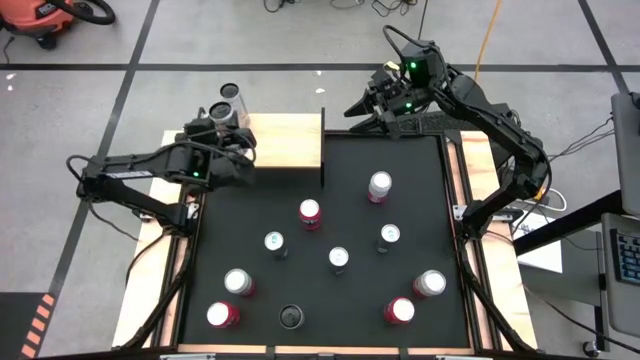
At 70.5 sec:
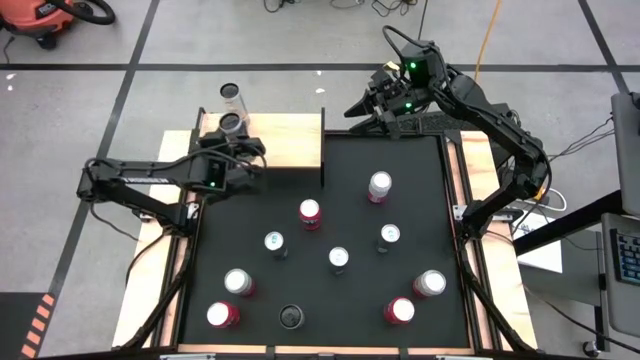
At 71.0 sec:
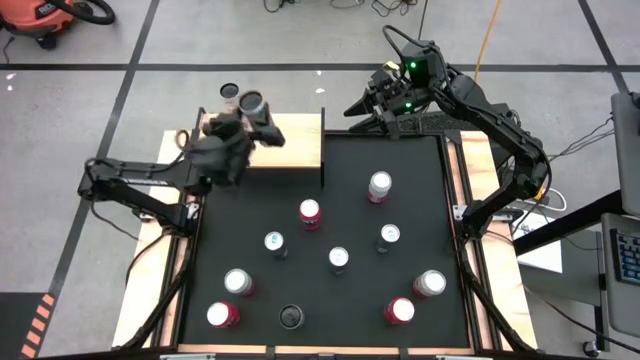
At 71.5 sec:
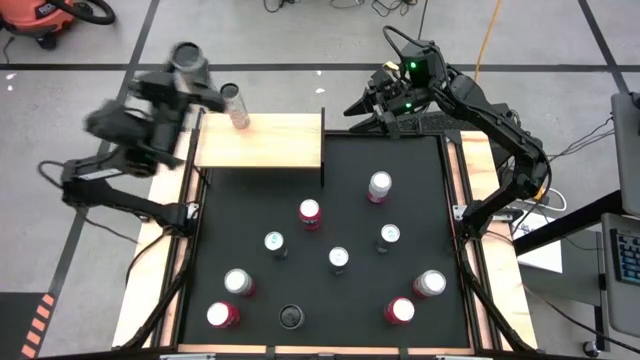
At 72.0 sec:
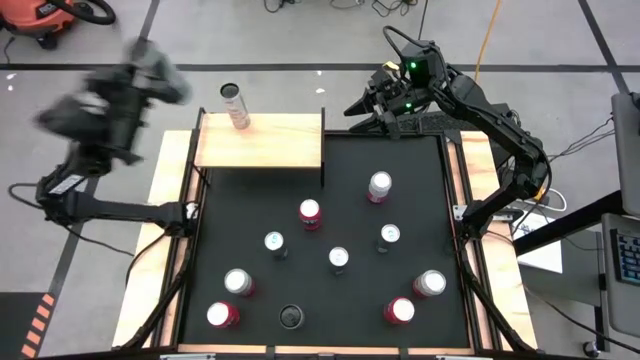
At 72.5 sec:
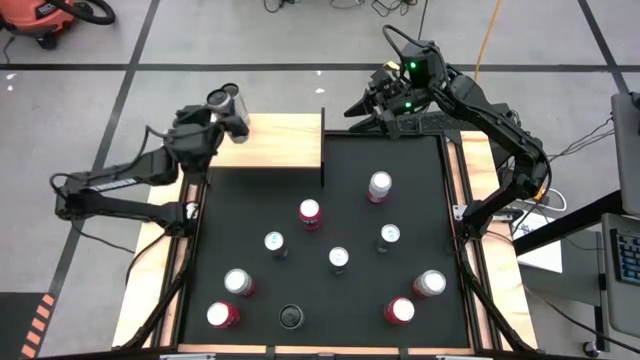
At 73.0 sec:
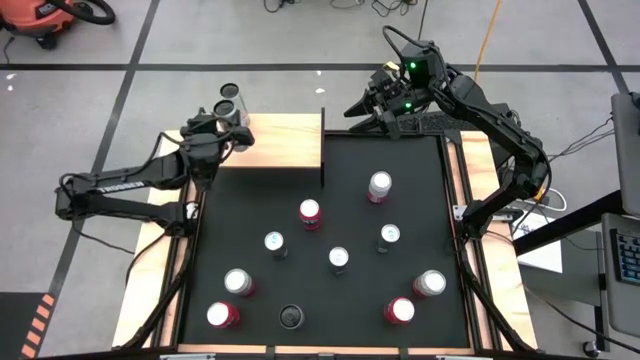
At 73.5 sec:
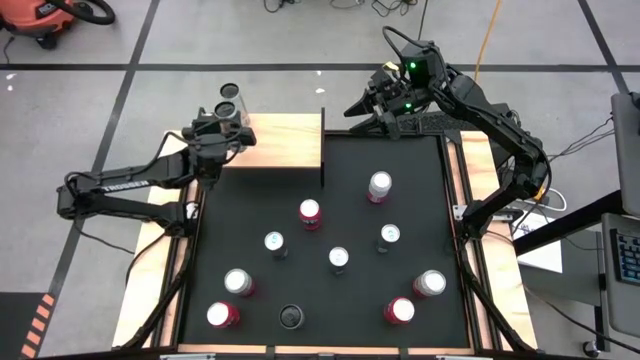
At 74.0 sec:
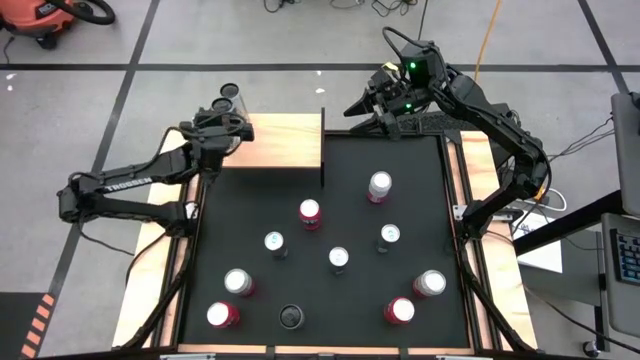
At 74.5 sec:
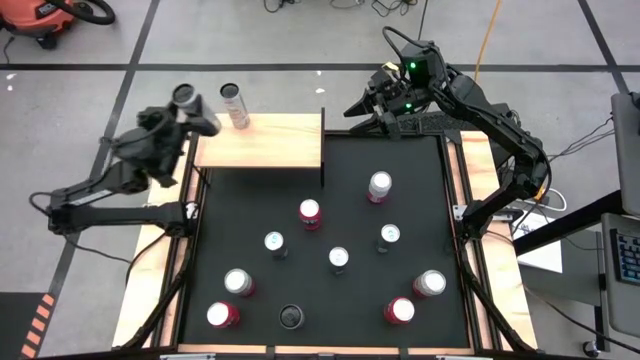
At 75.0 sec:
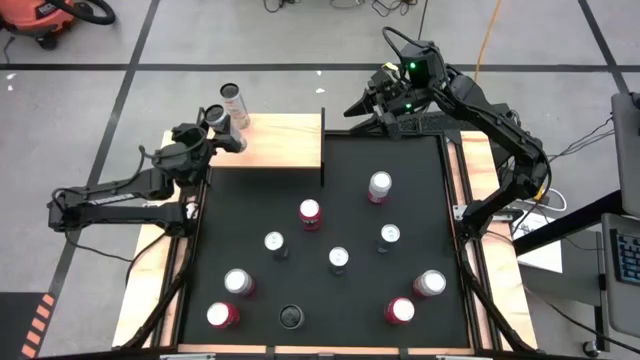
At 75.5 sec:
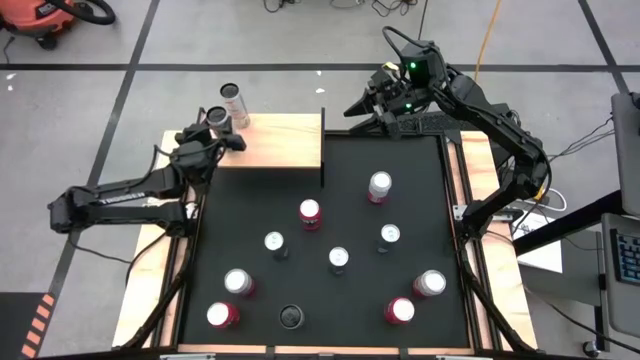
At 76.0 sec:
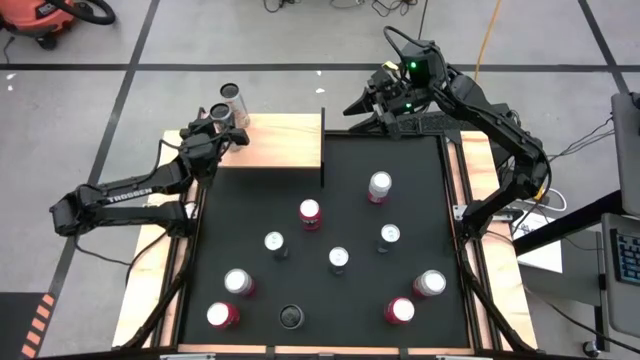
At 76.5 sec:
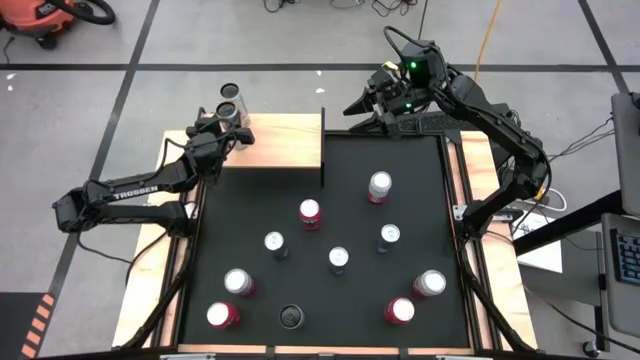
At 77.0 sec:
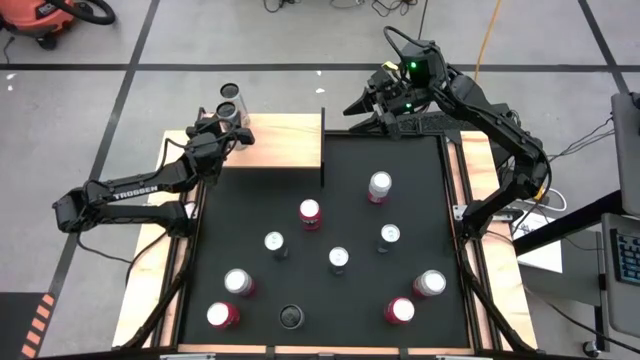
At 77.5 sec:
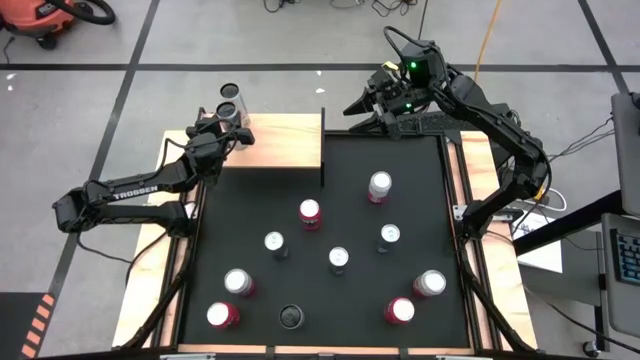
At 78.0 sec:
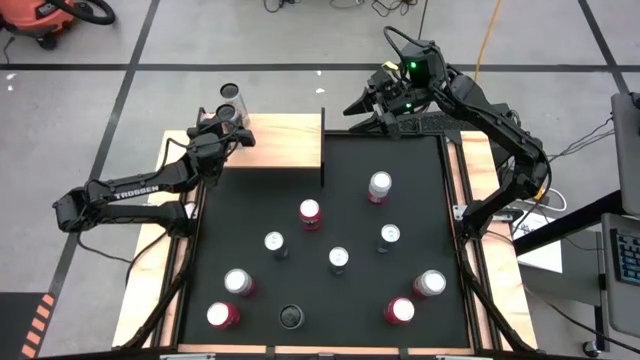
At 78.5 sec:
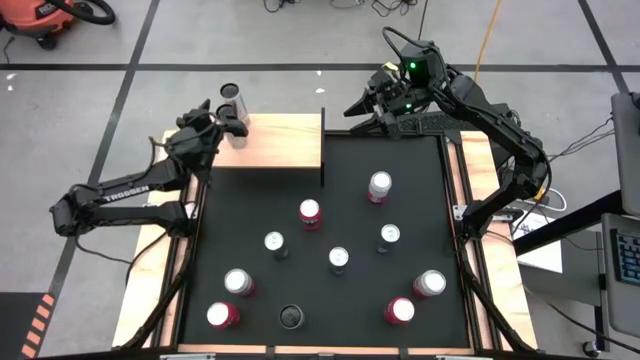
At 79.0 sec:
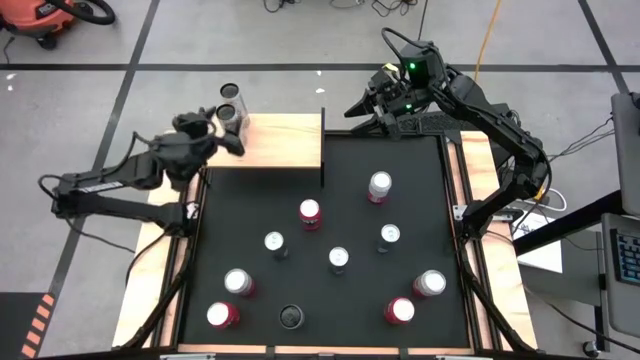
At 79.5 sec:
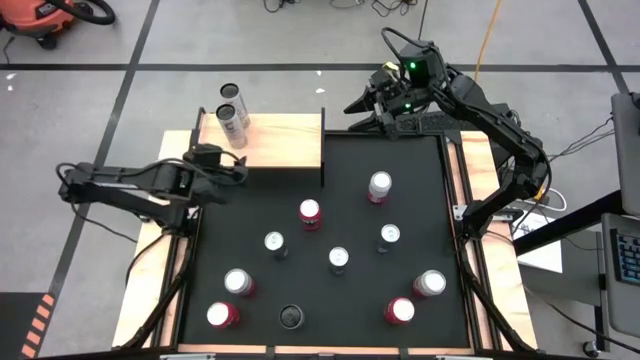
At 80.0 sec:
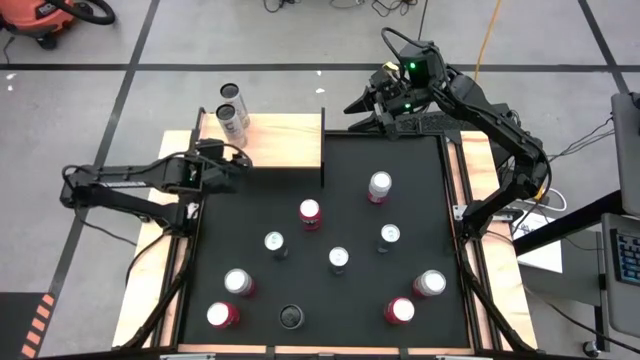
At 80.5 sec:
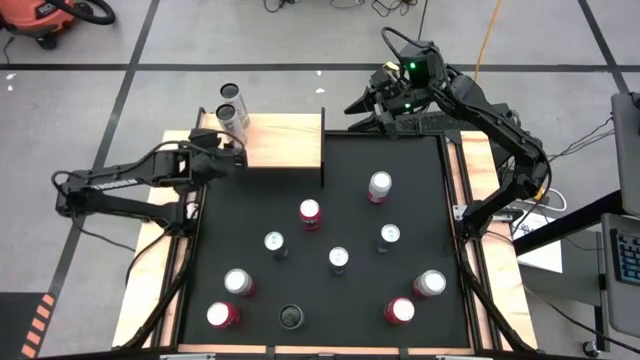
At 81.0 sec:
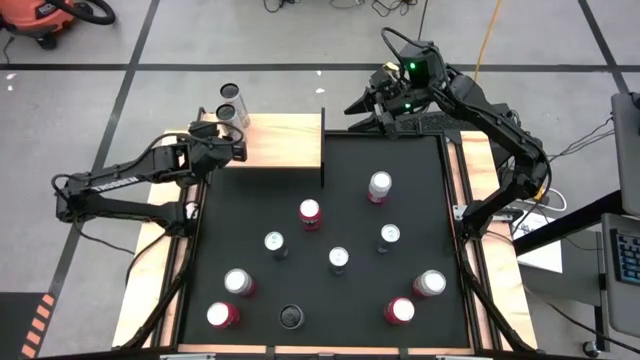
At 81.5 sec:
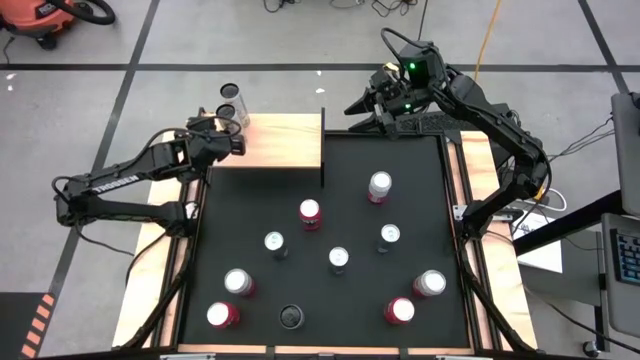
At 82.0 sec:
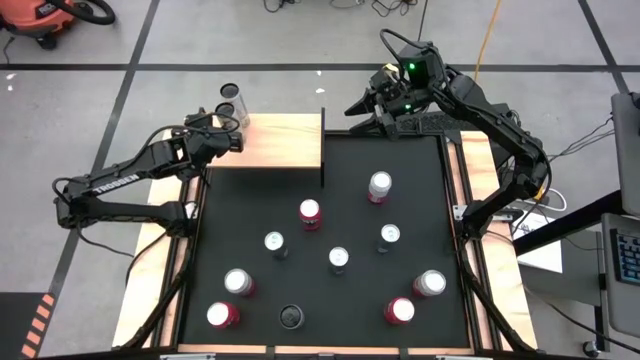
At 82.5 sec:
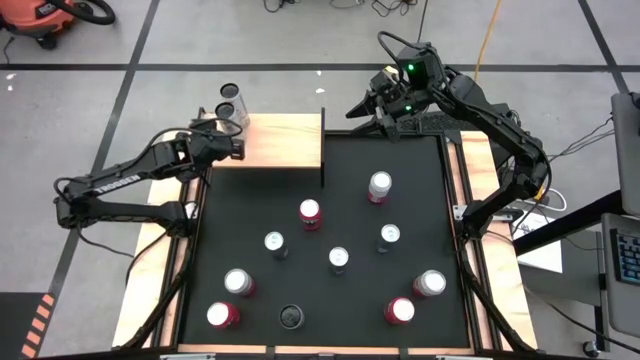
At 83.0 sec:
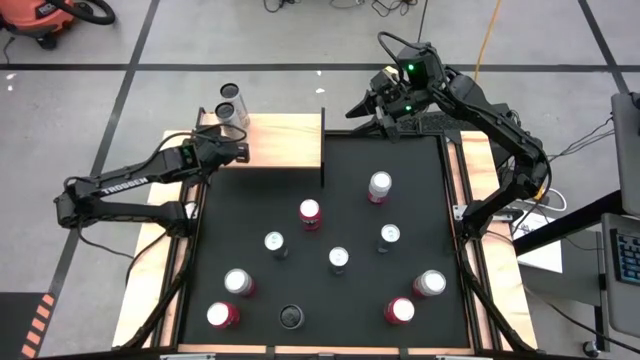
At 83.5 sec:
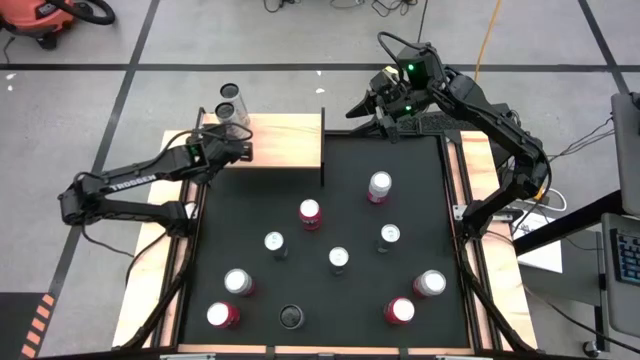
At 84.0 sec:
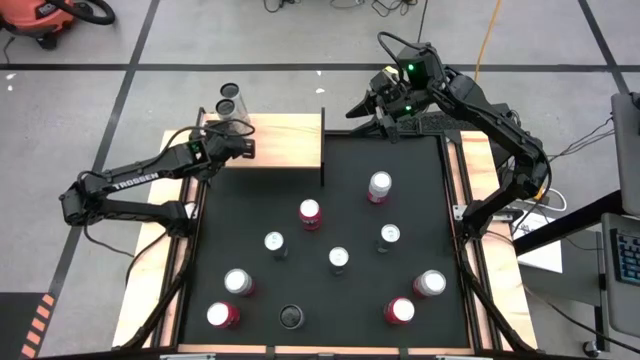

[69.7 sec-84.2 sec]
Task: Place canned beverage on shelf
Put the top white yellow soda can on the shelf aligned with the other white yellow soda can

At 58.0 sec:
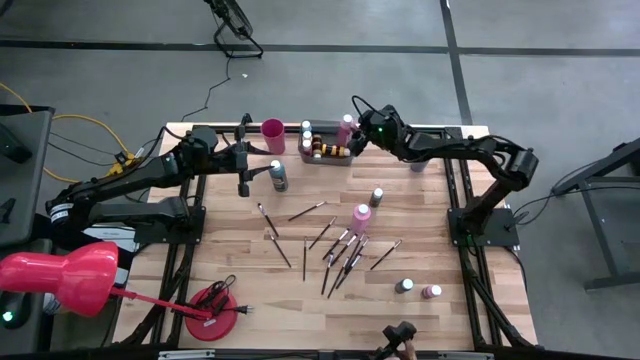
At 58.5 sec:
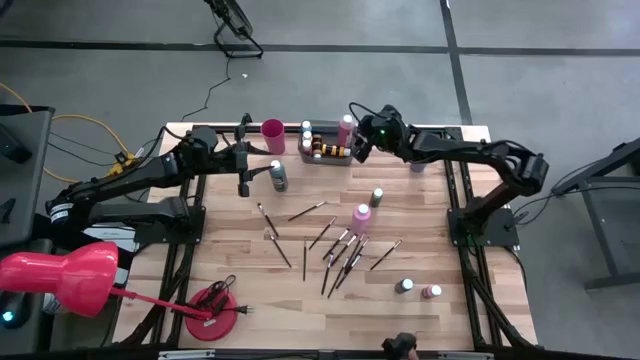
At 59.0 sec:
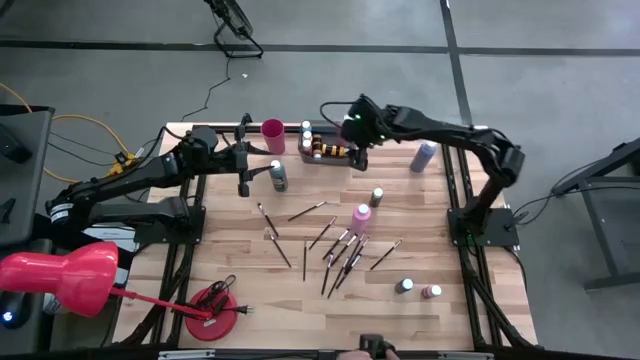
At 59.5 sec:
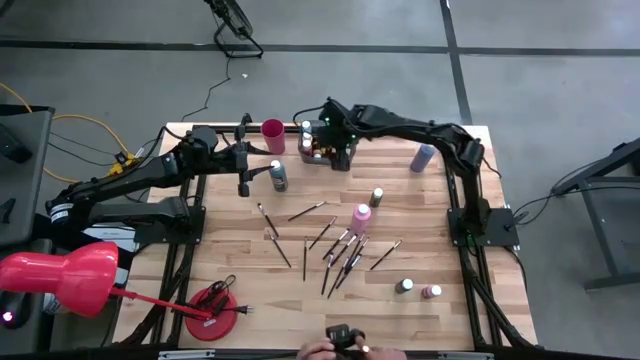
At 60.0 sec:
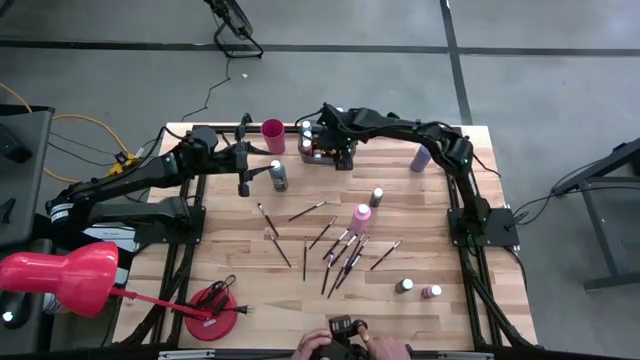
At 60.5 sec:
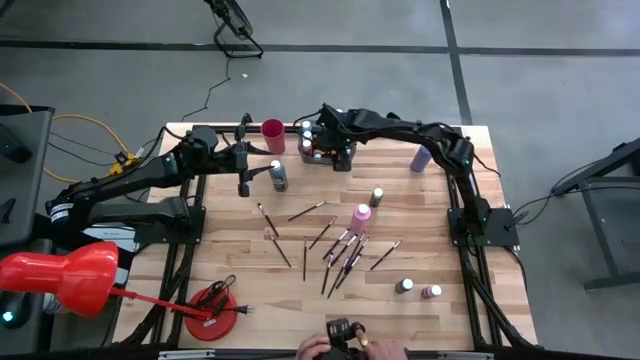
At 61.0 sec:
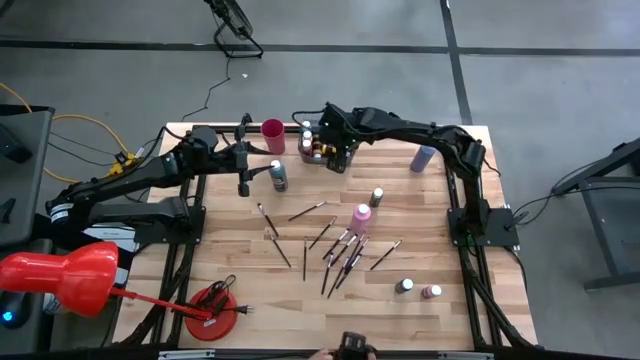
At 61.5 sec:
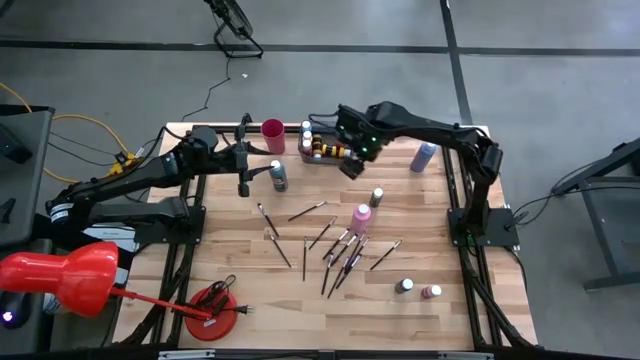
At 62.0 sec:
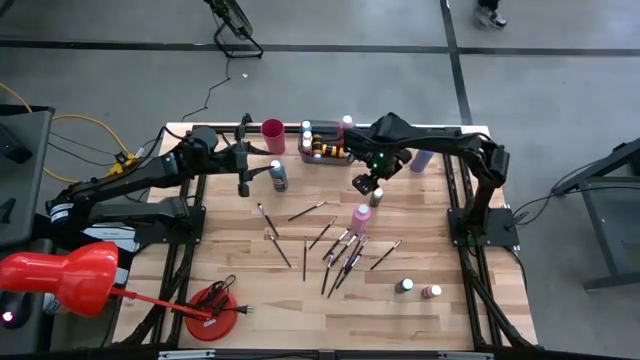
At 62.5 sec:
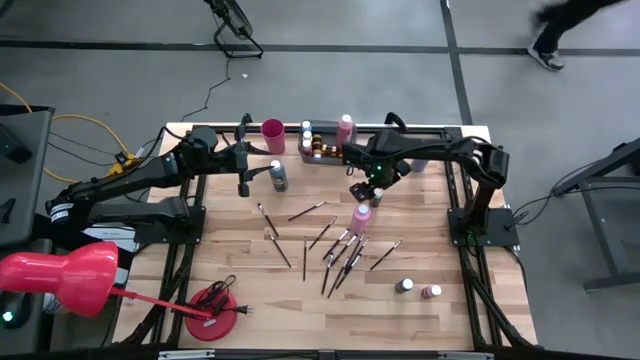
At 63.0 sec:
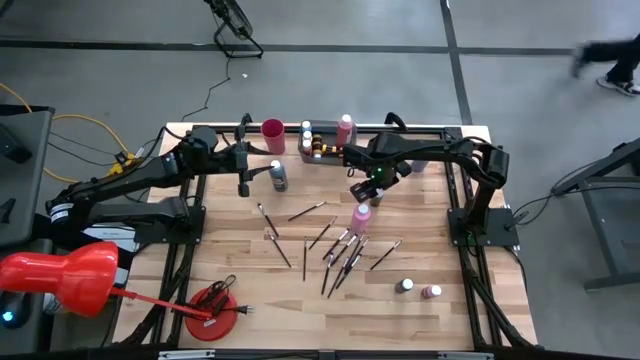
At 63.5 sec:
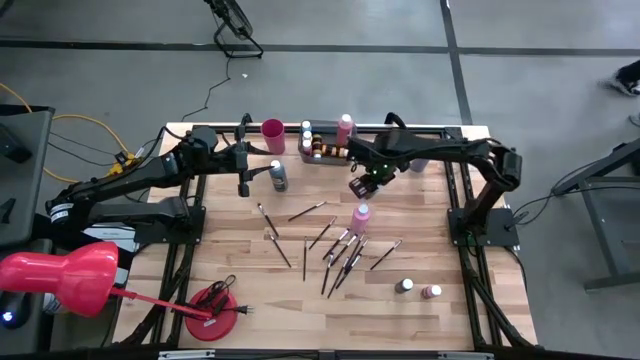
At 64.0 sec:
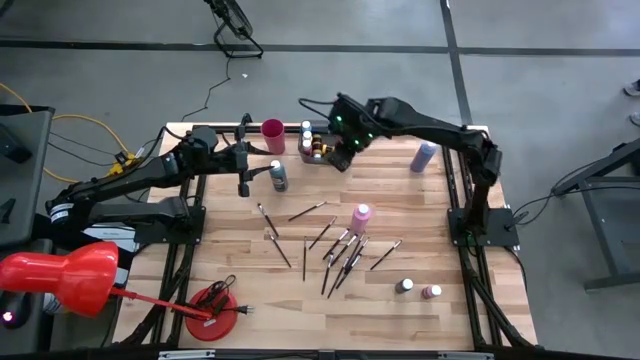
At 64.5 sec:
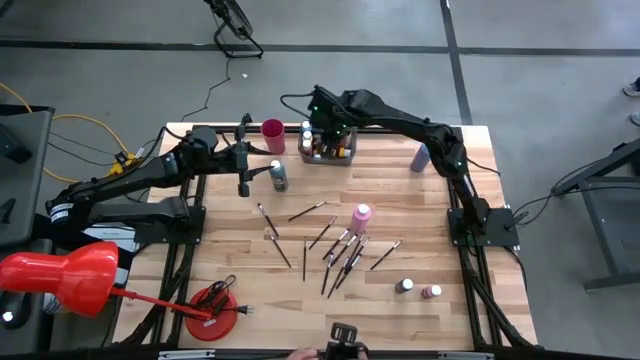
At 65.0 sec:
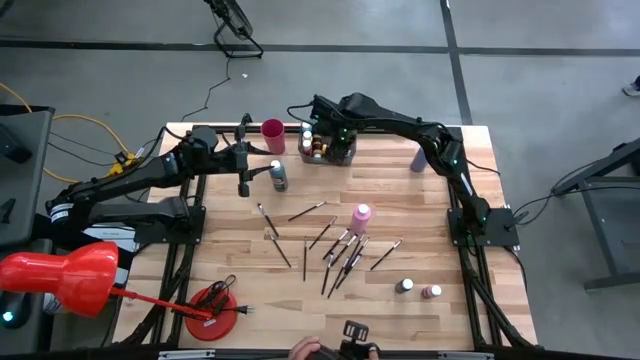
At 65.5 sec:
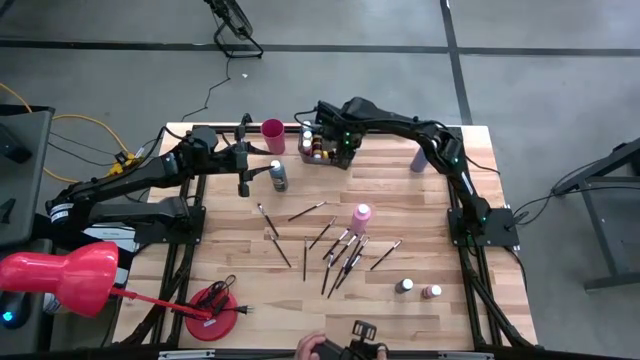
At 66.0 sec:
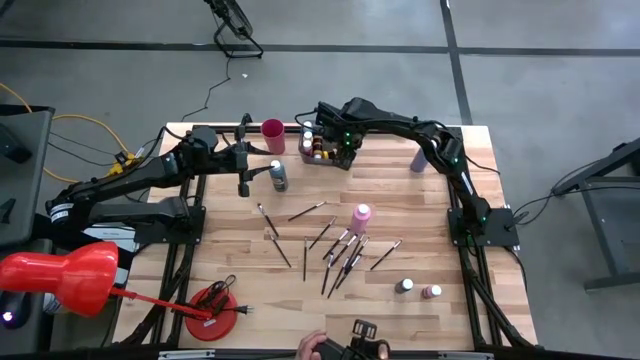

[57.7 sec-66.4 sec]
Task: Pick & Place Paint Supplies
Put the small green paint bottle into the black bin
